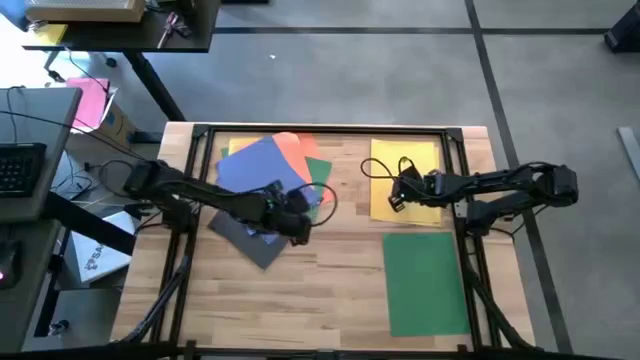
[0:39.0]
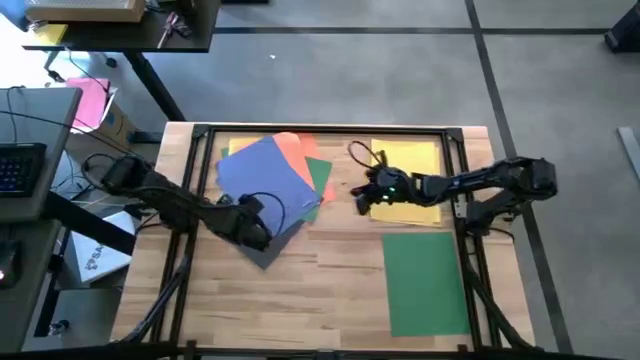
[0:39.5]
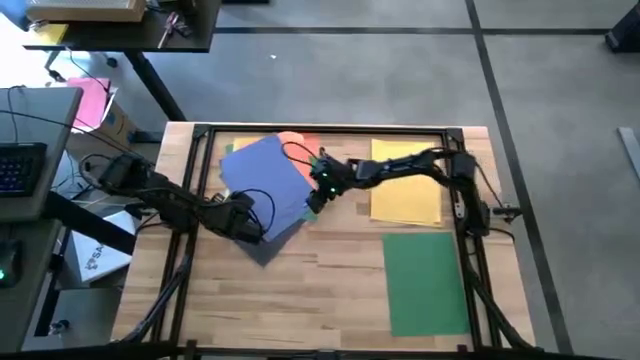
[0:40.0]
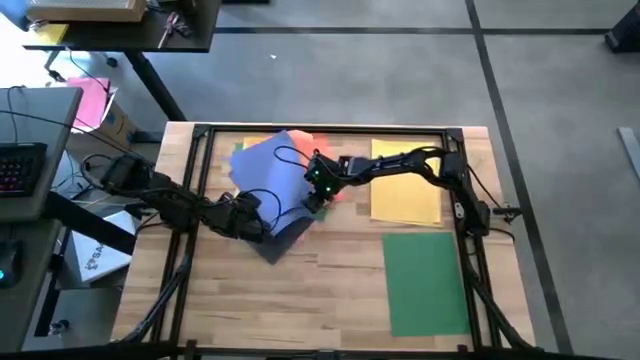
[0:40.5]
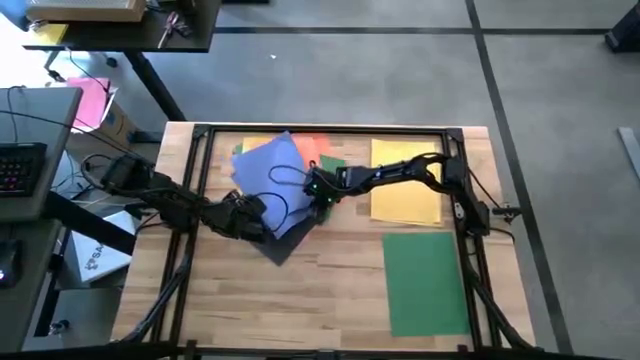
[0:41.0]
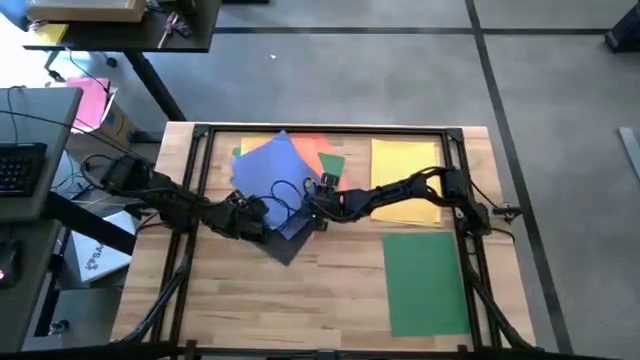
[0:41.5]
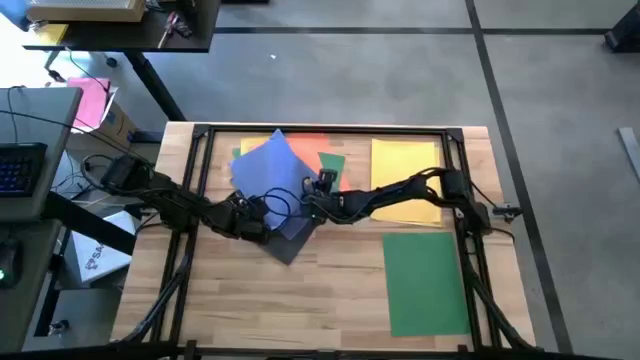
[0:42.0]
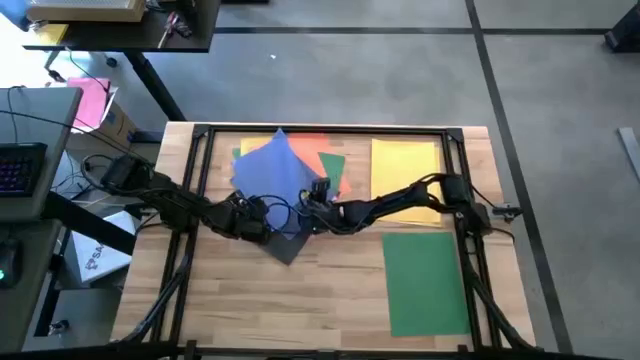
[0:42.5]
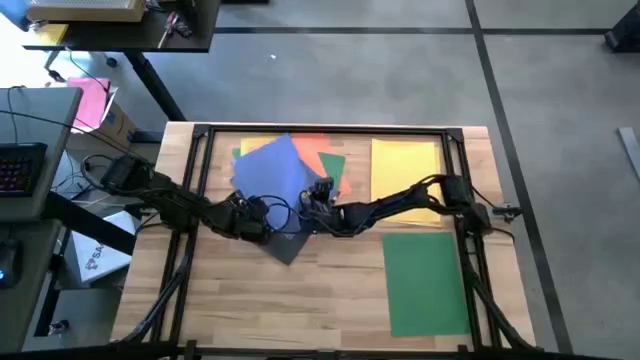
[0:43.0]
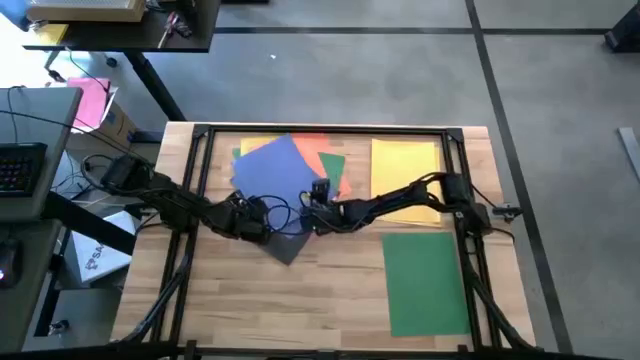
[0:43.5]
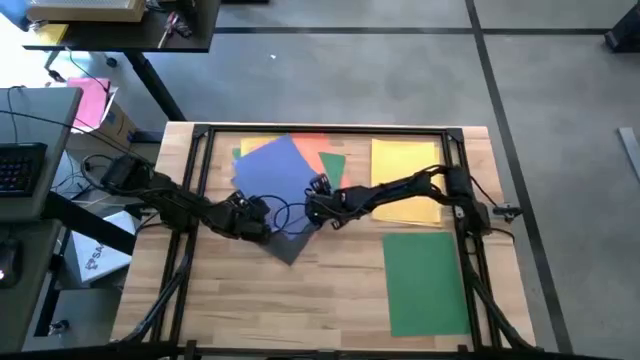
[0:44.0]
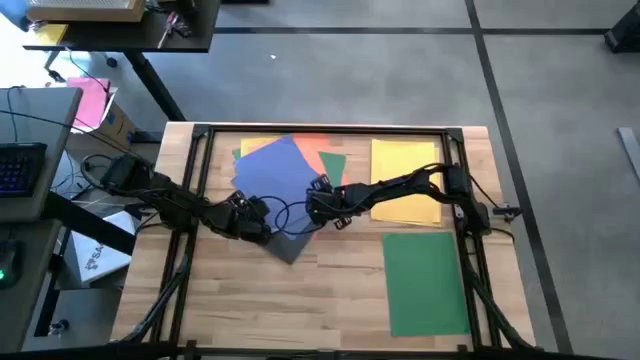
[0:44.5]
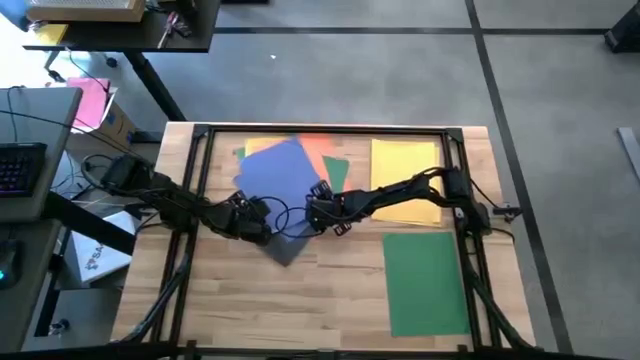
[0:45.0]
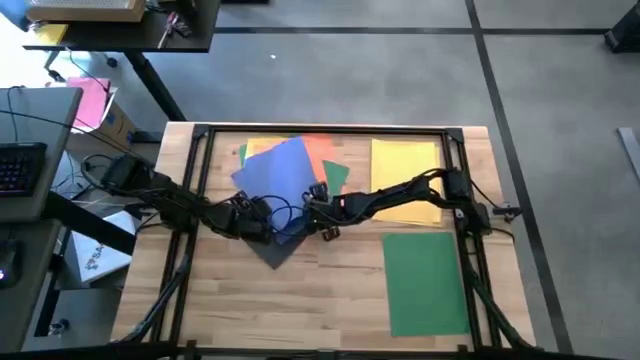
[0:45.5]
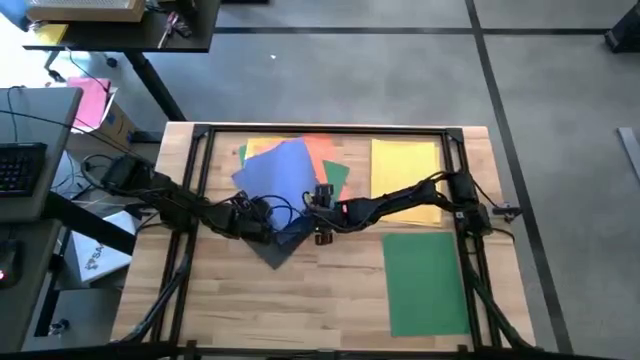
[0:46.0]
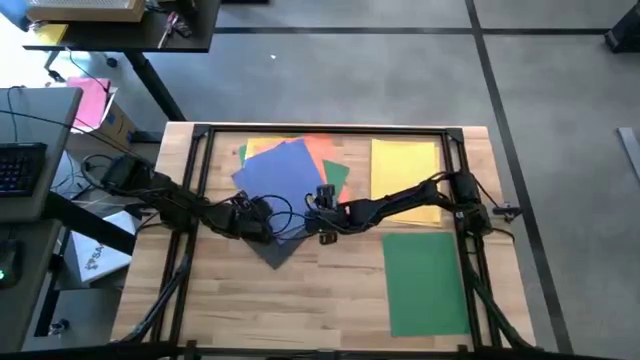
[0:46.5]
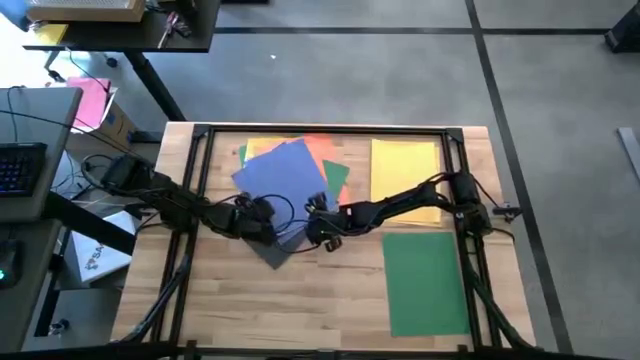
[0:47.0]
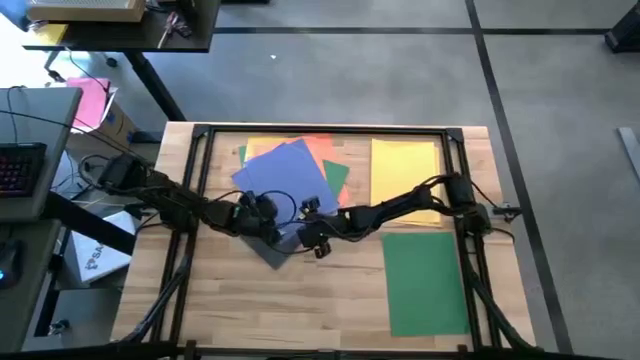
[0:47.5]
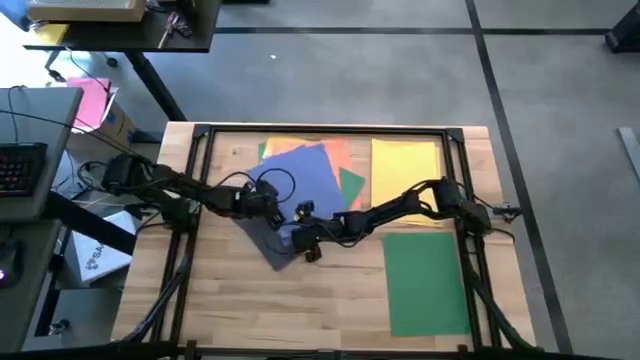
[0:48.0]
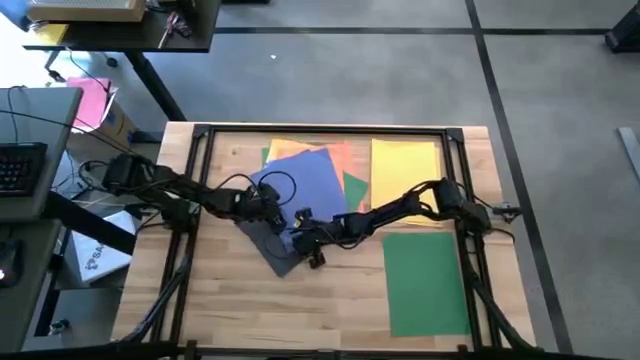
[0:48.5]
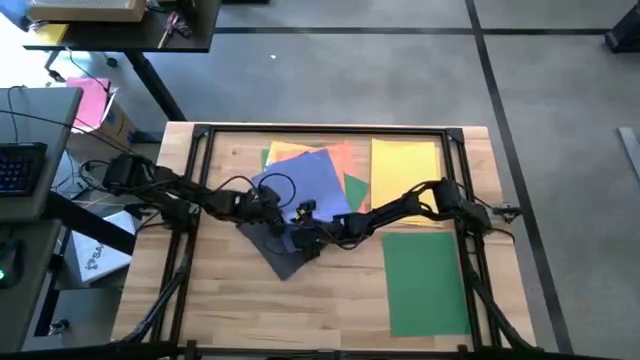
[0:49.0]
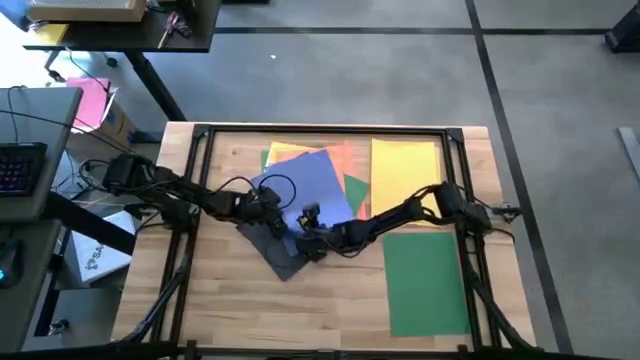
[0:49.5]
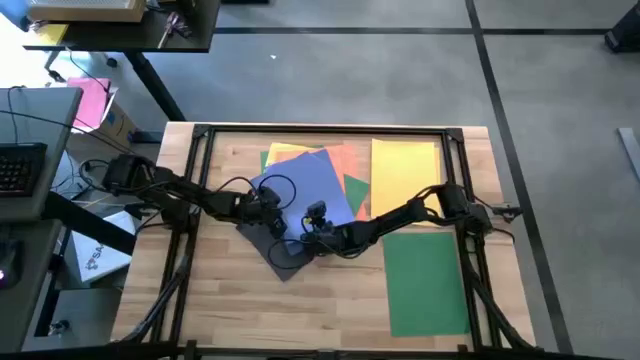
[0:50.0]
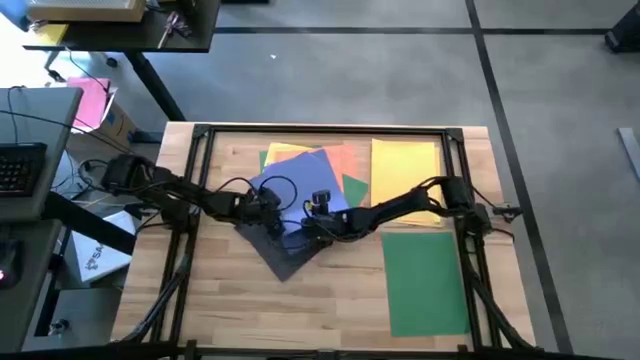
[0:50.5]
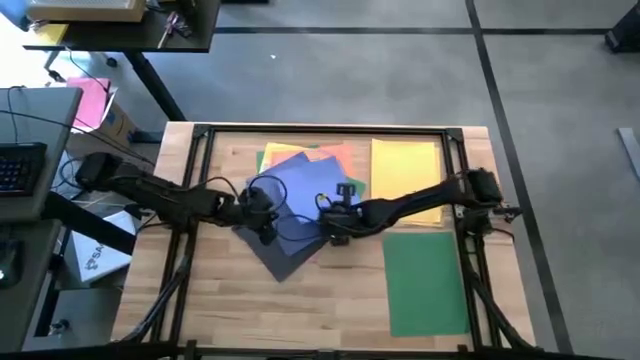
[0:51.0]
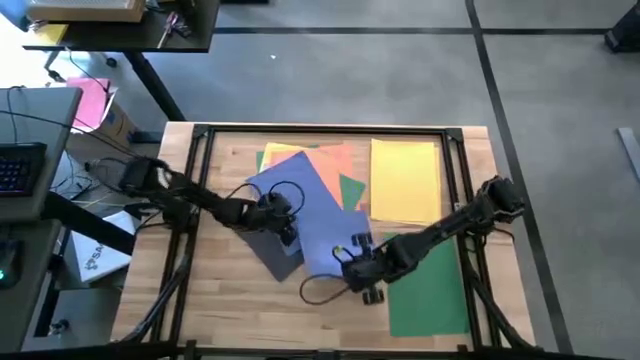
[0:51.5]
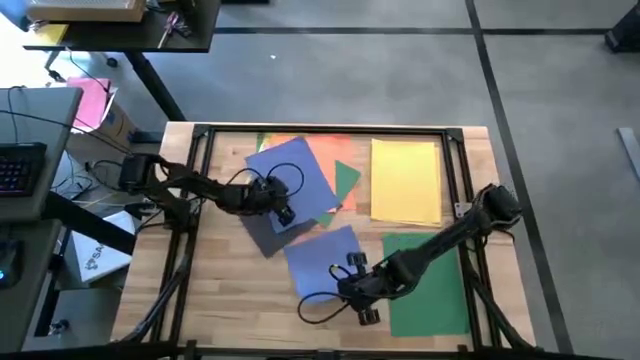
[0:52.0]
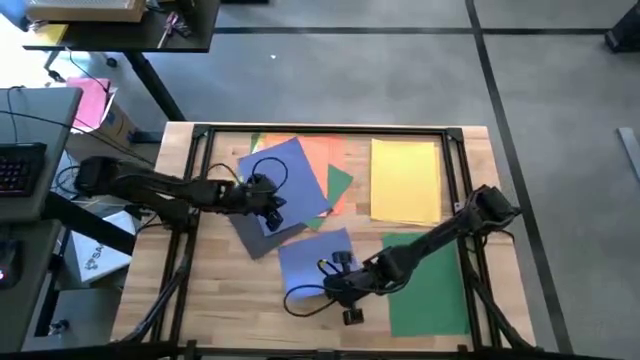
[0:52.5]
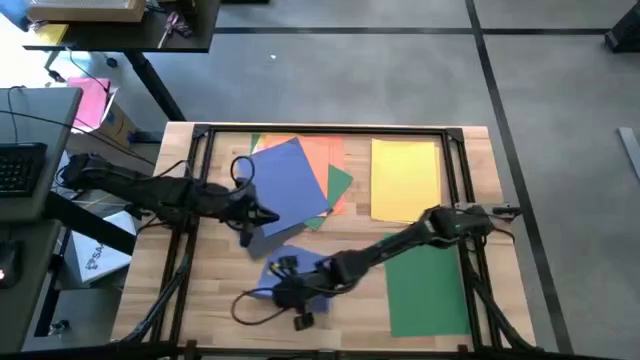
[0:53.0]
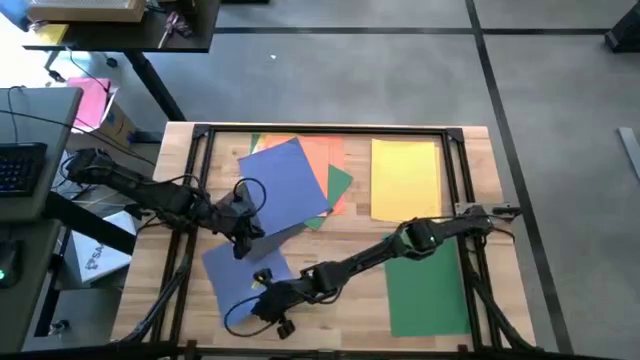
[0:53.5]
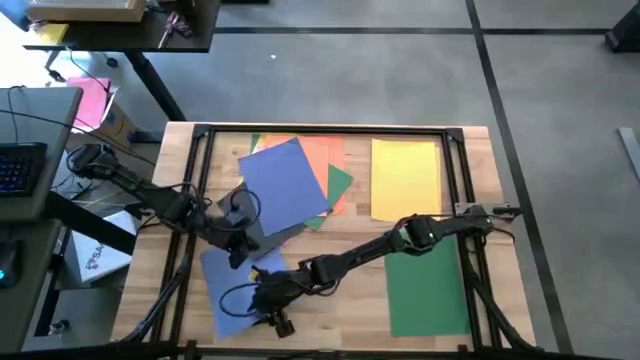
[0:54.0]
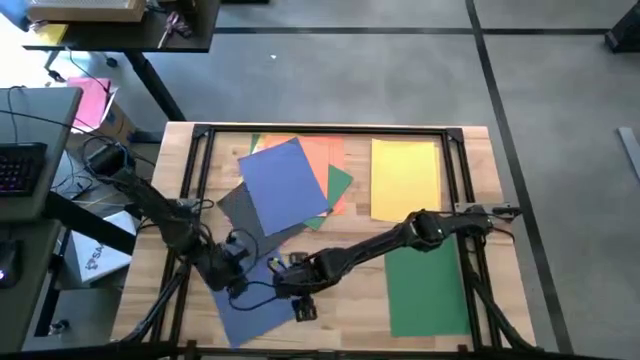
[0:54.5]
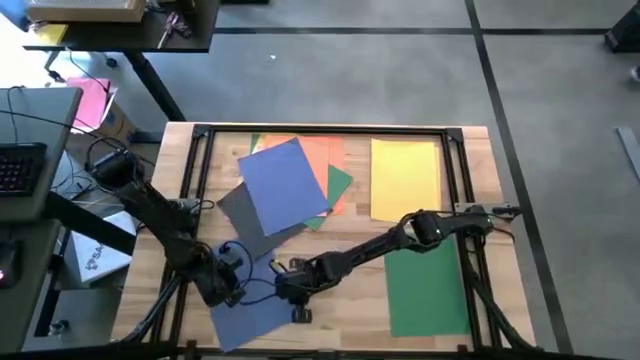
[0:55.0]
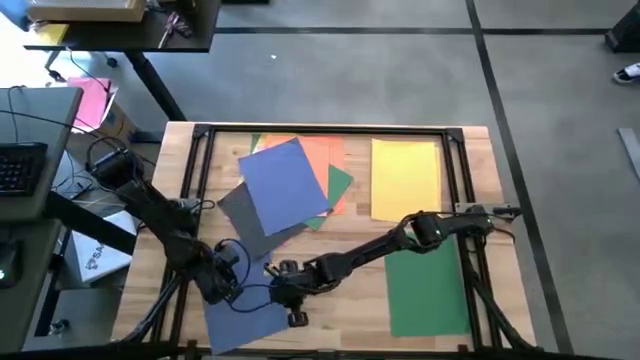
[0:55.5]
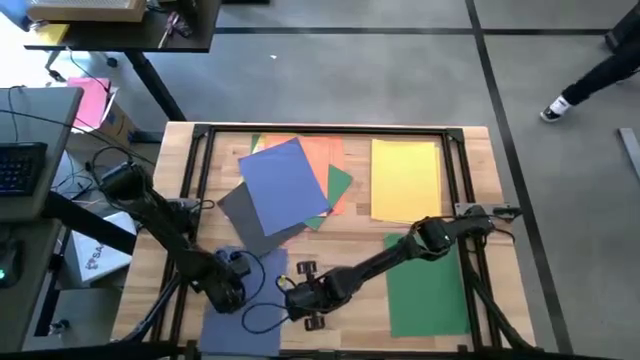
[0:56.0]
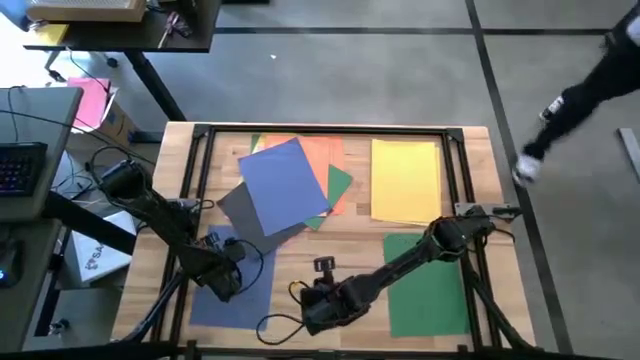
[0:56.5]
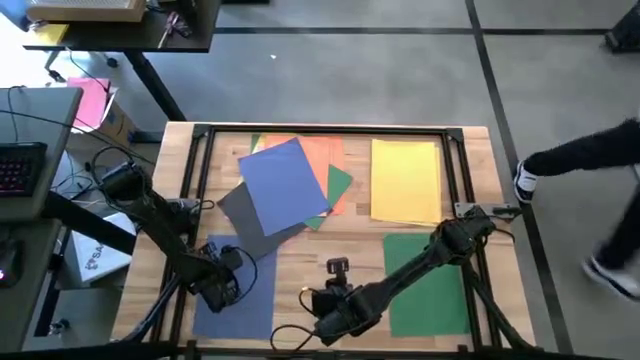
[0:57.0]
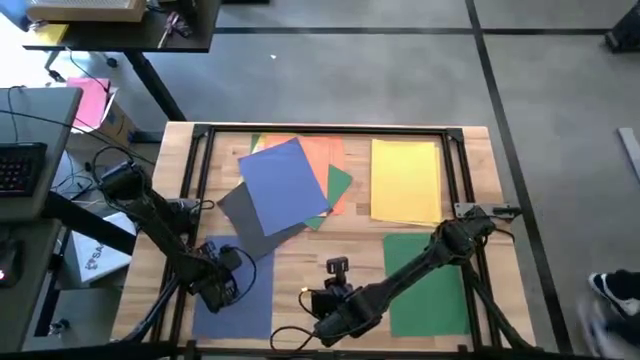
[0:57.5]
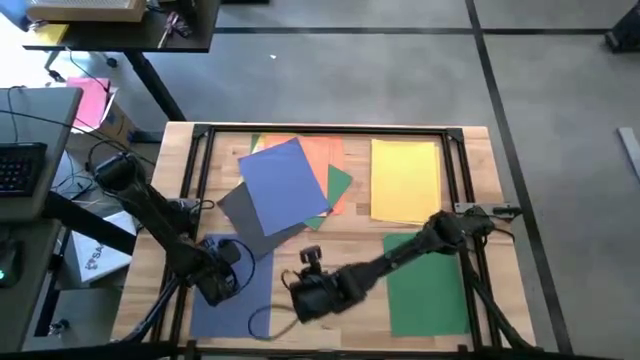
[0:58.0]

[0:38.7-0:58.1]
Task: Organize paper
Put the violet paper into the bottom left of the table

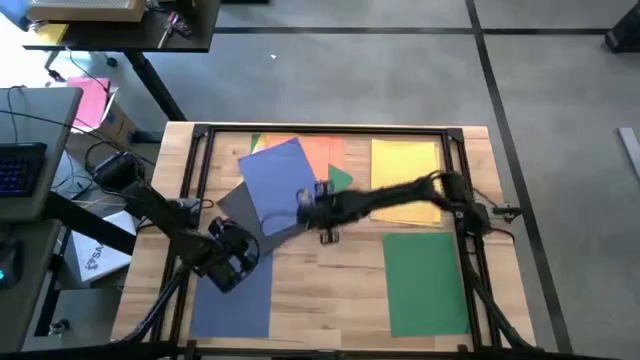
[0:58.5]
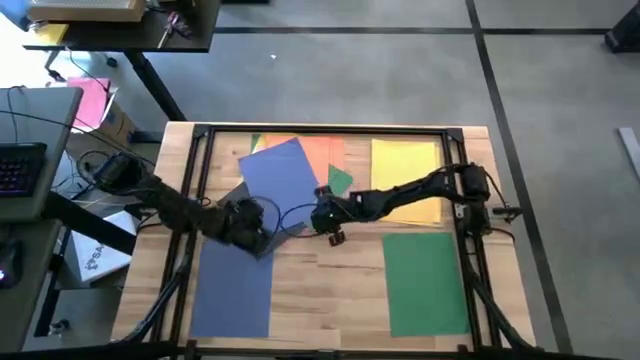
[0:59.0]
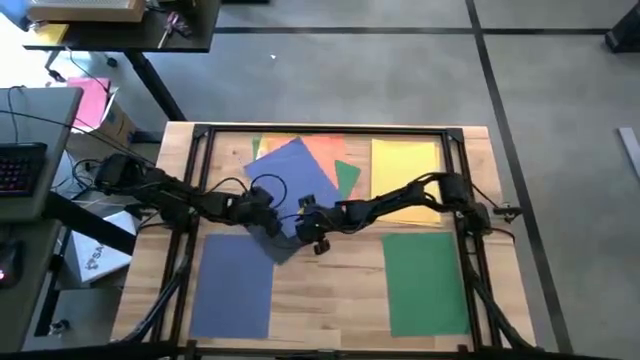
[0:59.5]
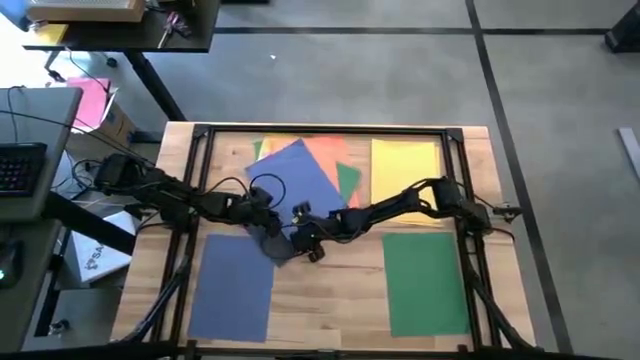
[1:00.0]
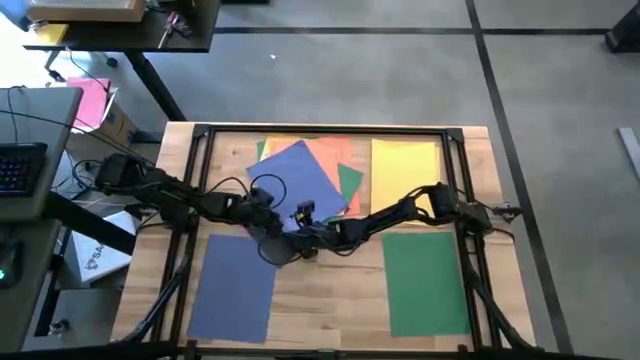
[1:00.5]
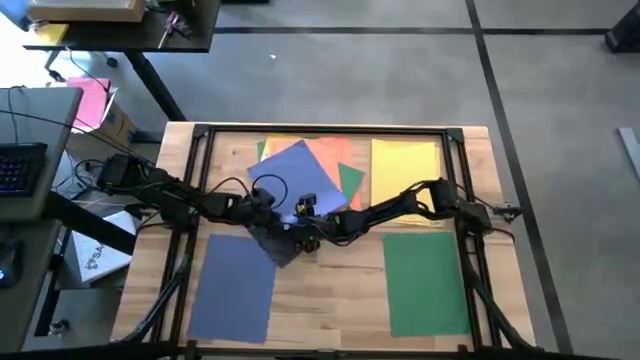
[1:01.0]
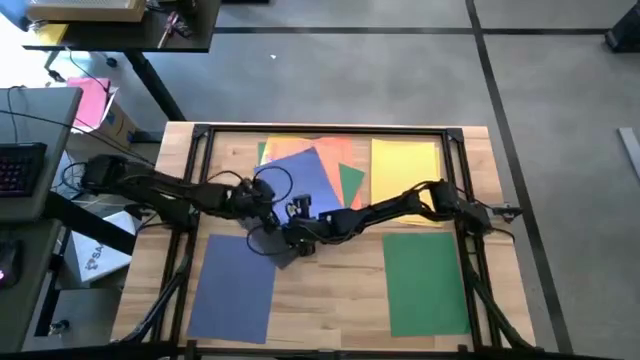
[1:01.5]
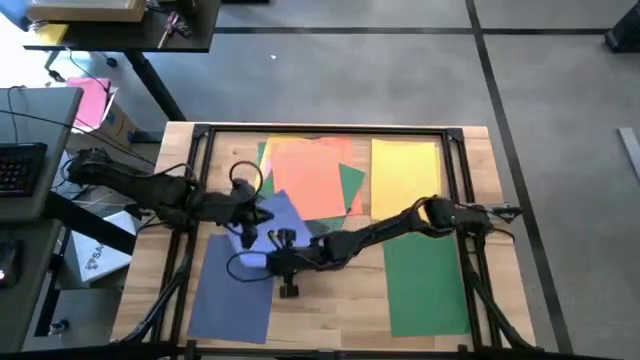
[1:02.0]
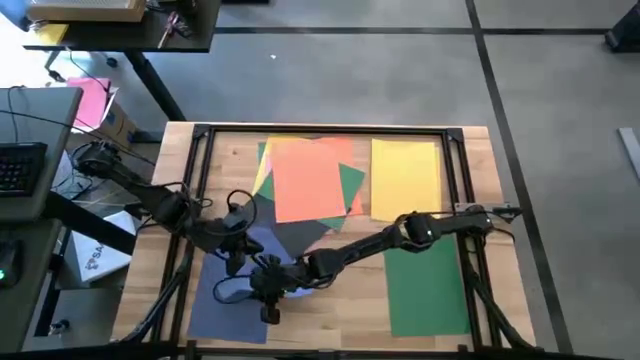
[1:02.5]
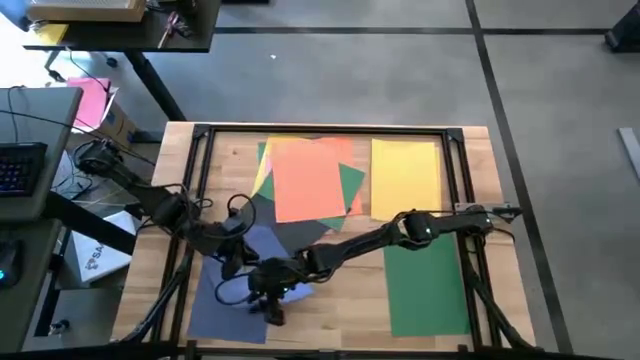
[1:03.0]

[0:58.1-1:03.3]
Stack the violet paper on top of the violet paper
